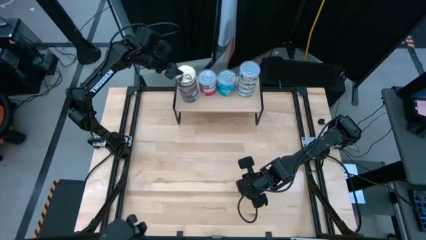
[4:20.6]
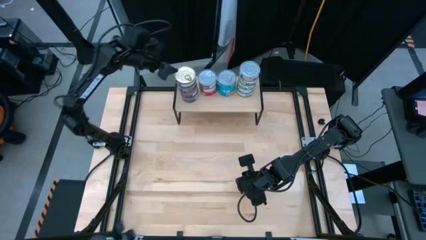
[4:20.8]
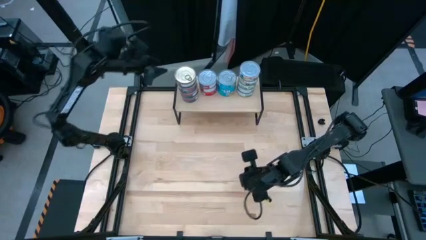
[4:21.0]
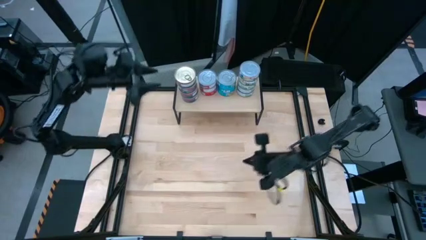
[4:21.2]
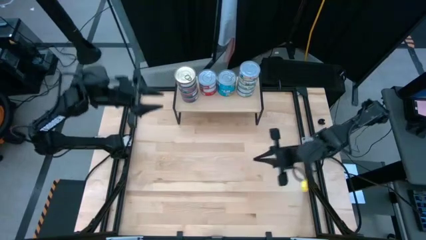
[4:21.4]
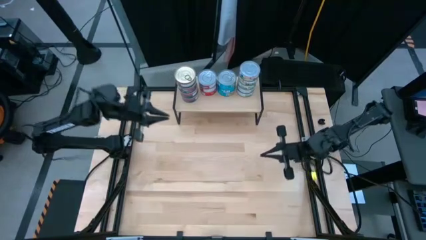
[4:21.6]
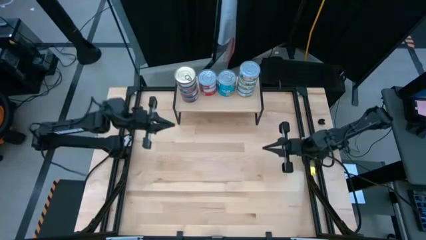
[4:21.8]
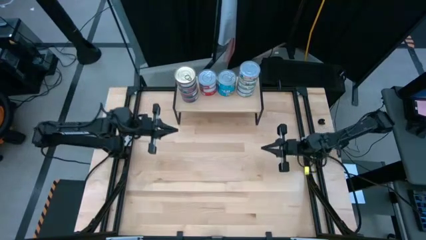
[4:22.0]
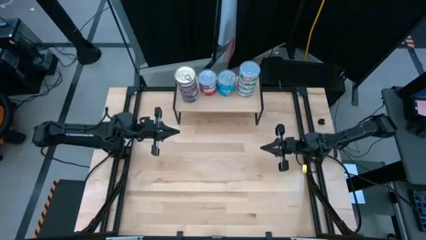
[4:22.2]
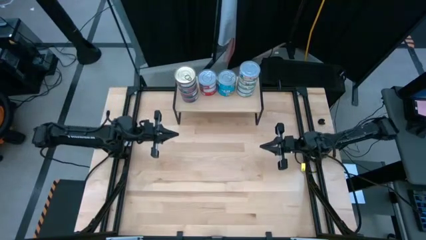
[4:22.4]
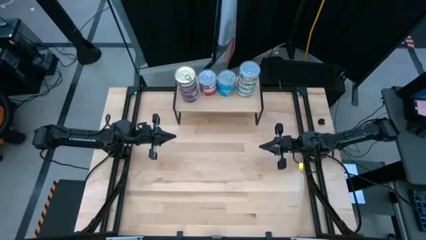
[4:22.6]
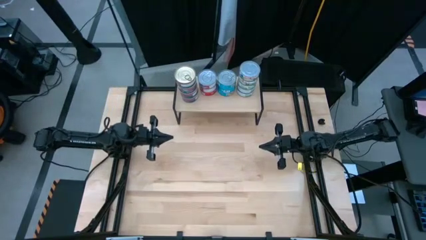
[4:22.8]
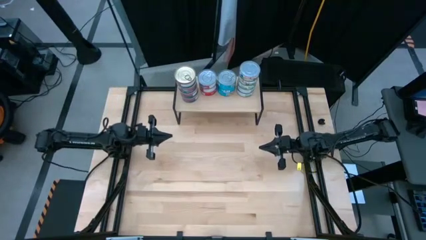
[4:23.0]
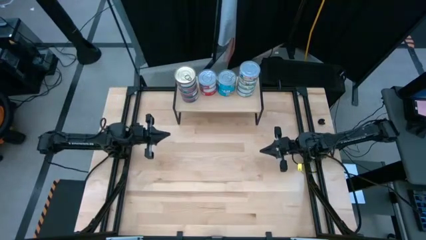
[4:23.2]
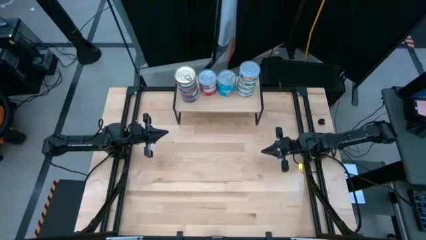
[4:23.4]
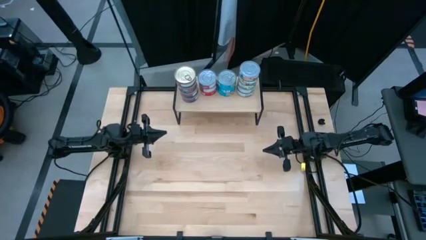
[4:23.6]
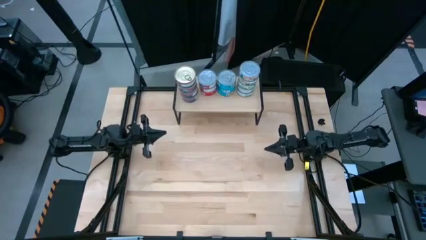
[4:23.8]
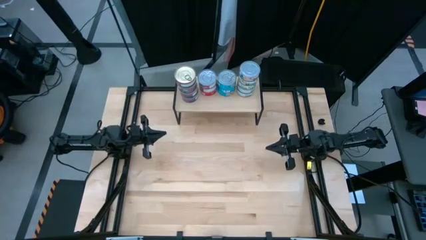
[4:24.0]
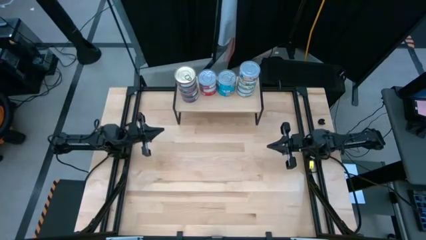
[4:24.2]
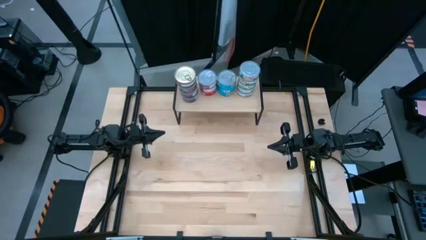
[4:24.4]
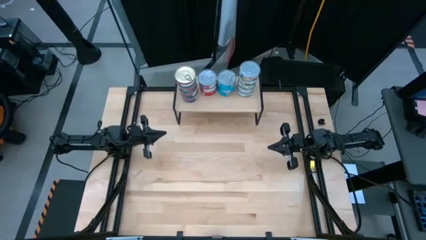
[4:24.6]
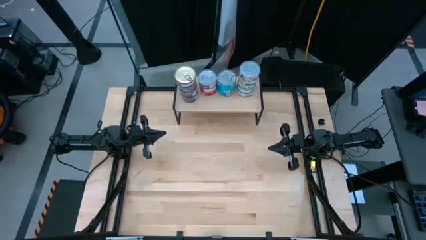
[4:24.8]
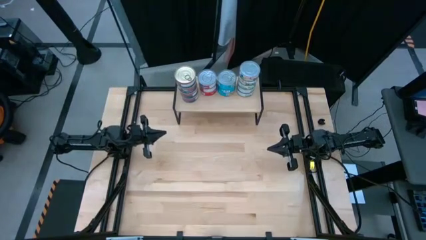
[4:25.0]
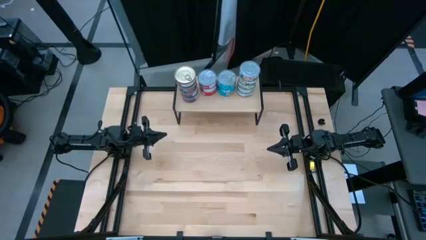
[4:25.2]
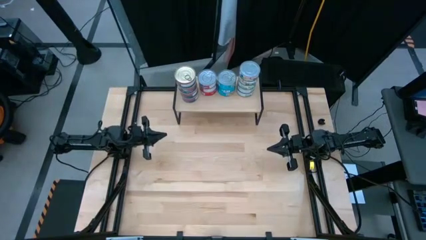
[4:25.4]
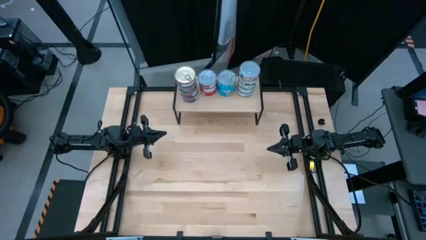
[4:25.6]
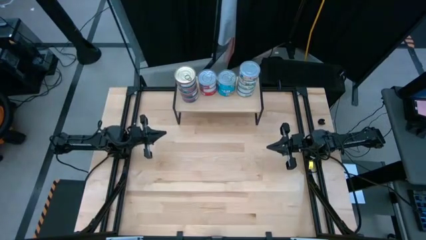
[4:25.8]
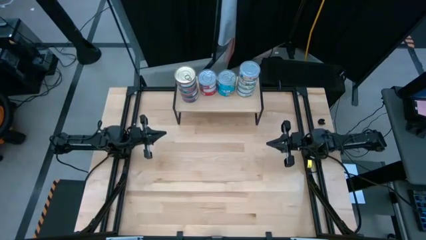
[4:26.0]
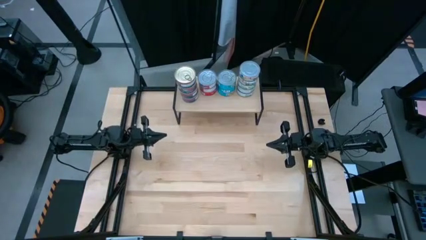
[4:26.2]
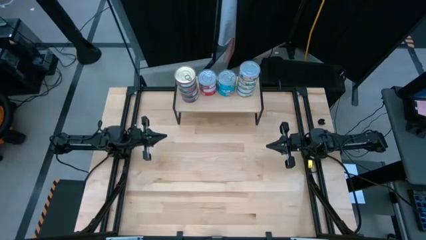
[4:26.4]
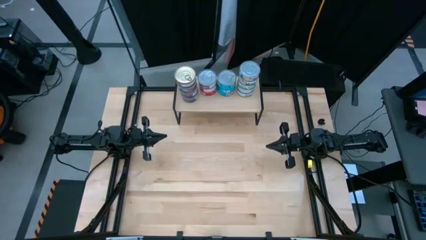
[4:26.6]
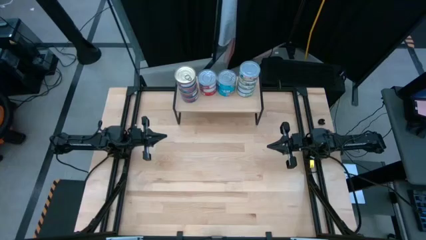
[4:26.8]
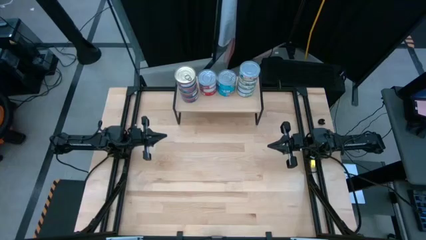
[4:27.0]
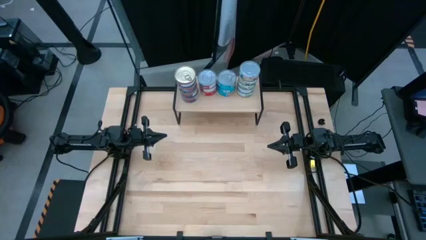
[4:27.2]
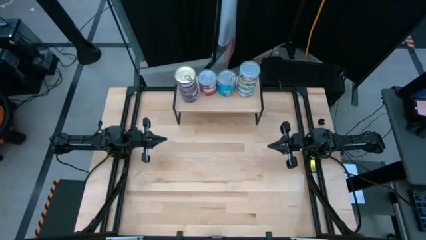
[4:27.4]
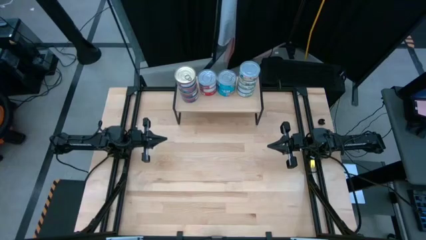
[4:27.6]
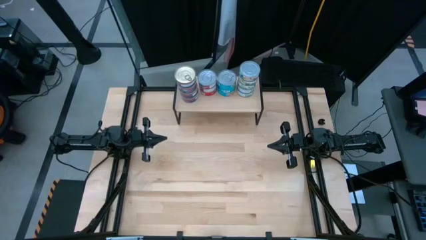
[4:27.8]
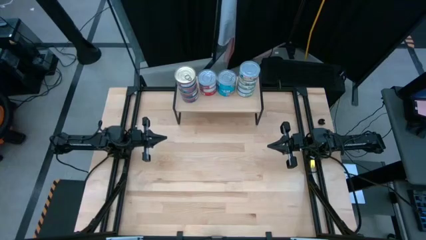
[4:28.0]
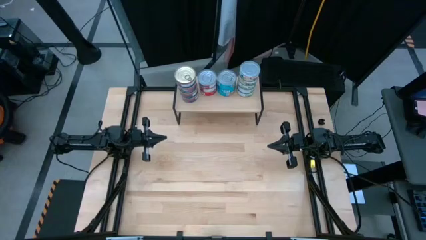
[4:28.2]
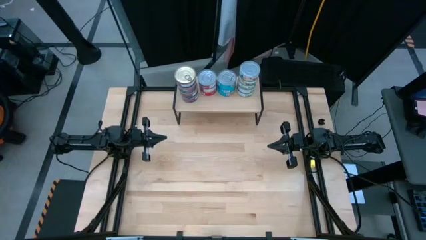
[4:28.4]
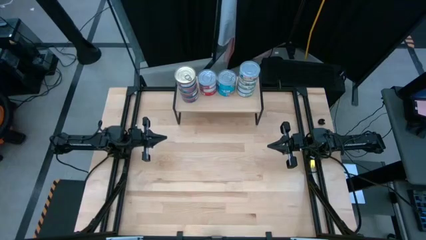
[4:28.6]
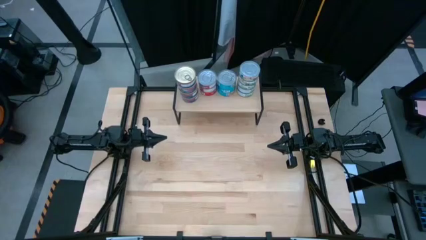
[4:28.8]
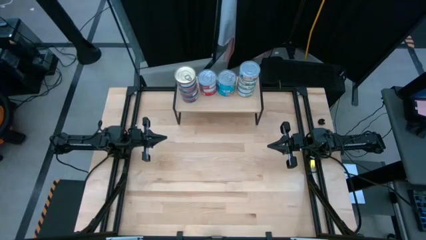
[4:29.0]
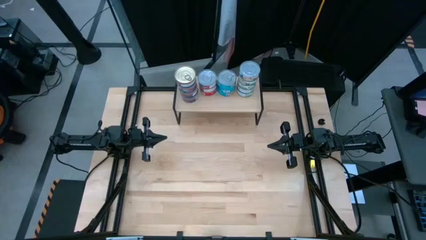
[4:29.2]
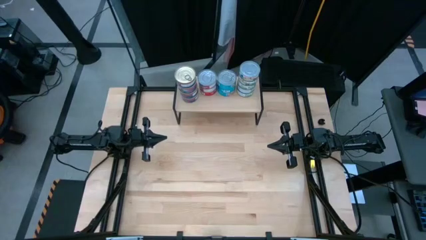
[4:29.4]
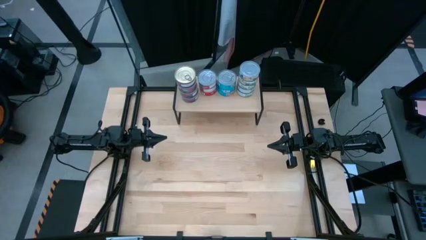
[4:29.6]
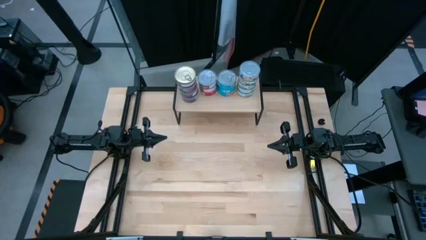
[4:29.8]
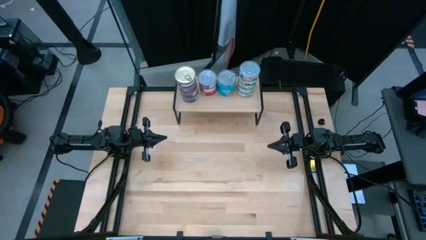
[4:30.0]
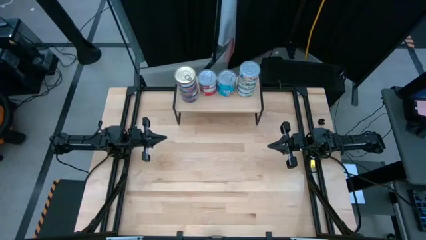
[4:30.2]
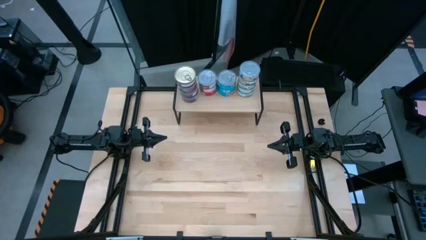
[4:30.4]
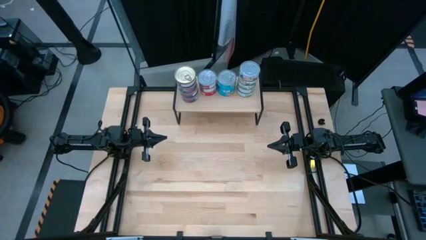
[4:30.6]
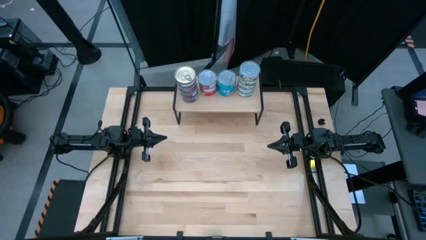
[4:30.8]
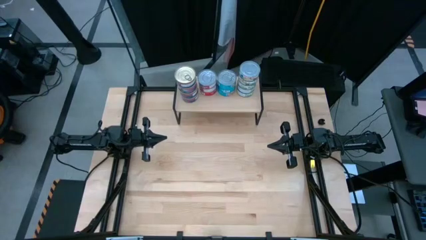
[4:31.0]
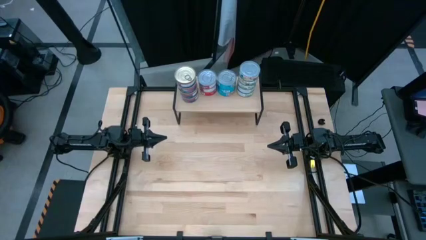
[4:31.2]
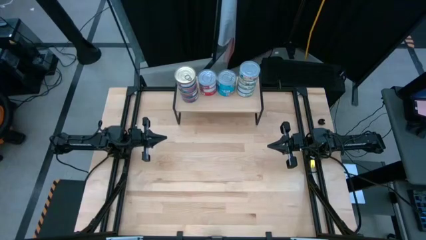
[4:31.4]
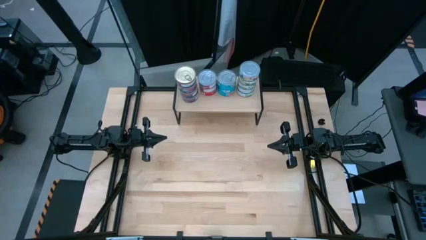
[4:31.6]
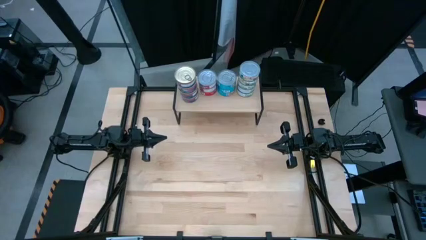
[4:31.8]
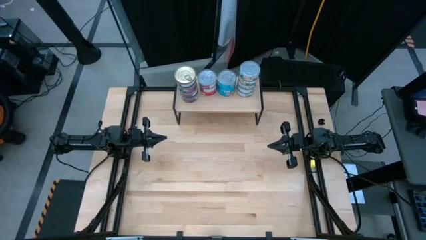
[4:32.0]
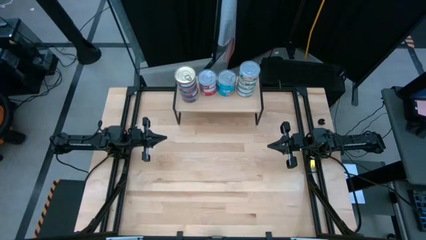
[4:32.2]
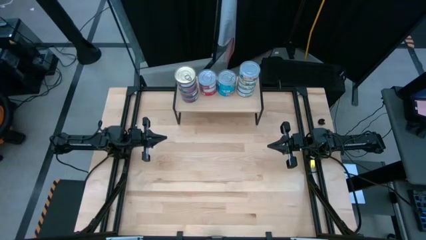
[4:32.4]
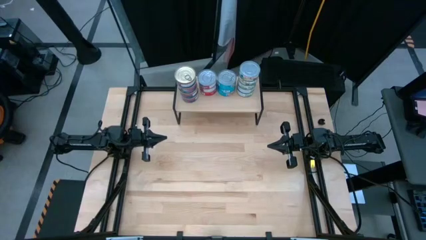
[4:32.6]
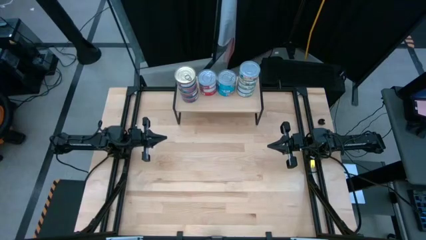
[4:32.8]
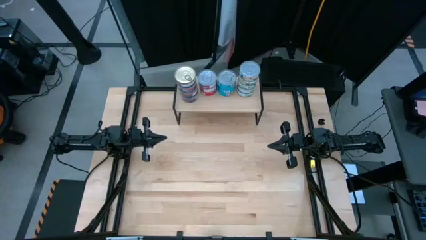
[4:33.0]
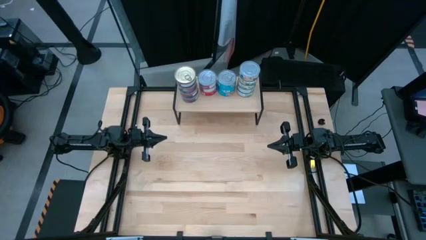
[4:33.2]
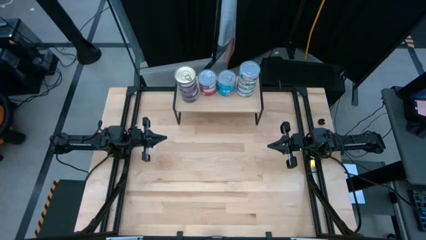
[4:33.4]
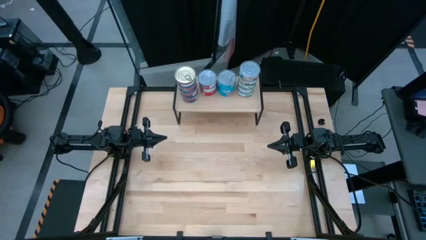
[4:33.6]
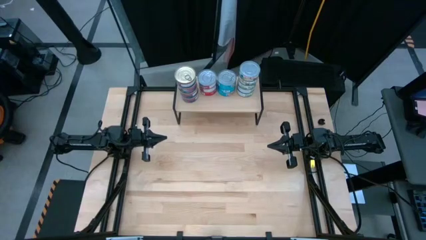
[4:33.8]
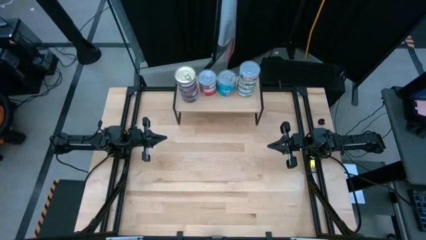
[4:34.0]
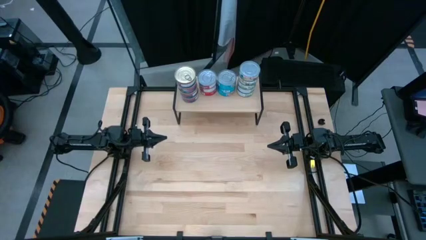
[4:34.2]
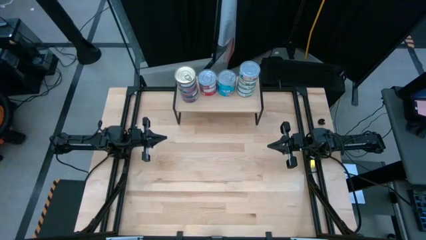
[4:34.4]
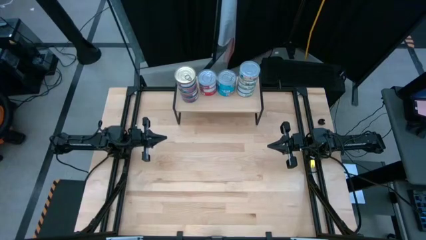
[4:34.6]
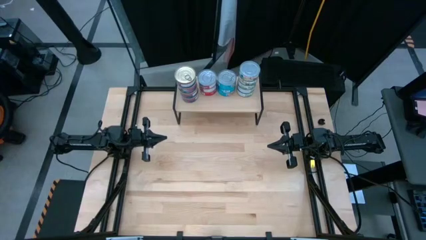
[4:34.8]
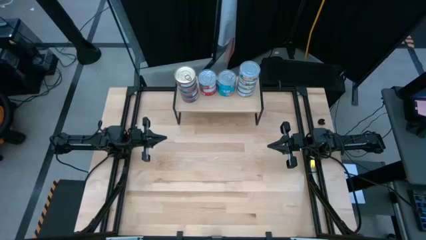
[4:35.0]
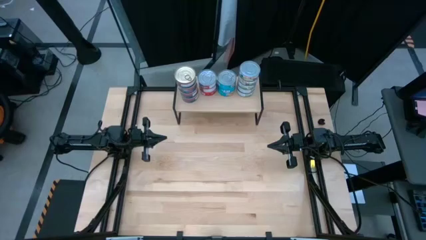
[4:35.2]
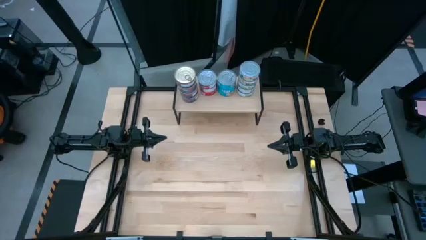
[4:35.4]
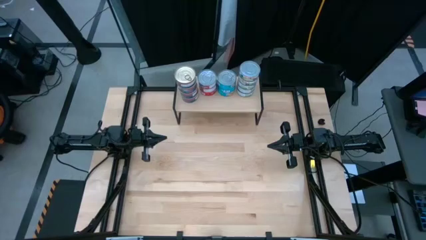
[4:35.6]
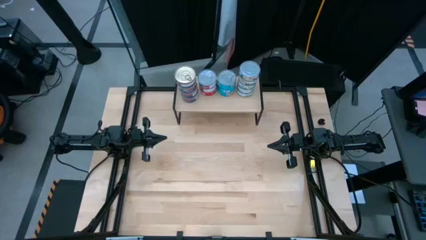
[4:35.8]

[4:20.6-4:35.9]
Task: Stack canned seafood by type on shelf
Return to Home Position
